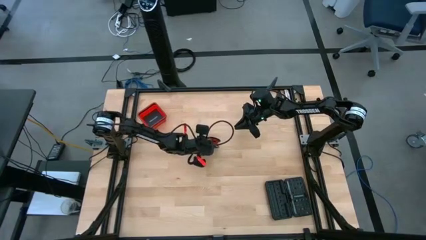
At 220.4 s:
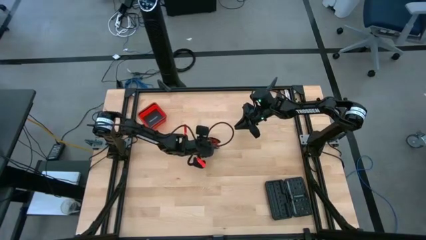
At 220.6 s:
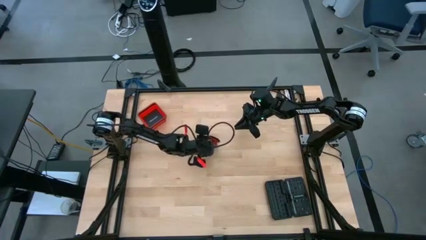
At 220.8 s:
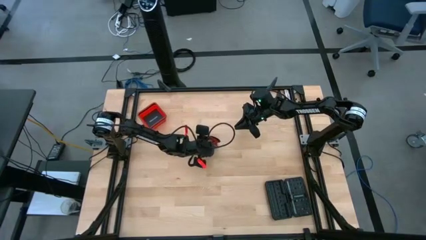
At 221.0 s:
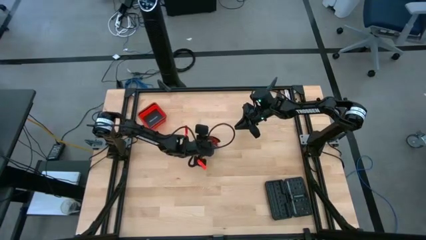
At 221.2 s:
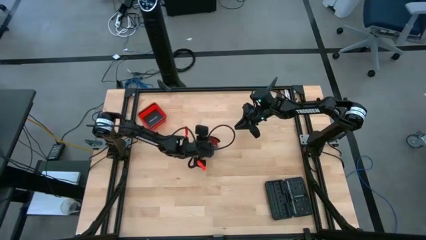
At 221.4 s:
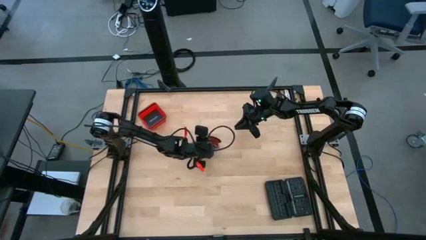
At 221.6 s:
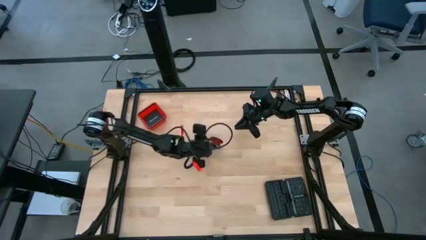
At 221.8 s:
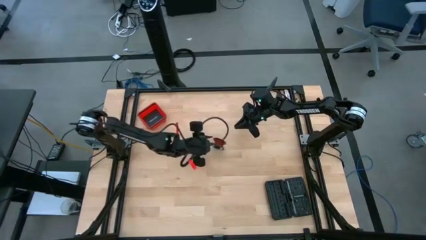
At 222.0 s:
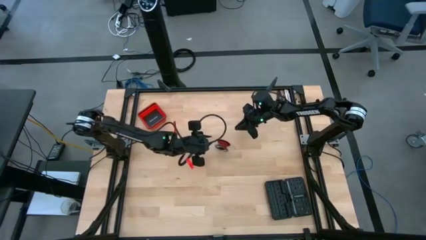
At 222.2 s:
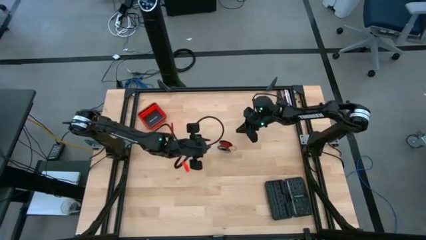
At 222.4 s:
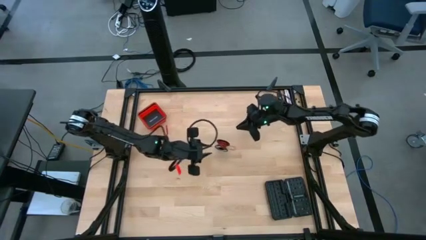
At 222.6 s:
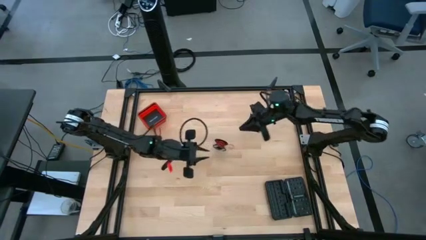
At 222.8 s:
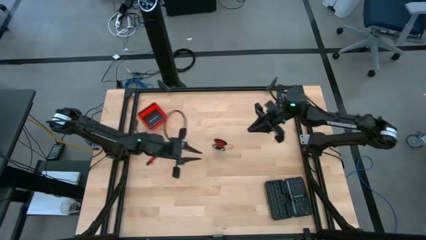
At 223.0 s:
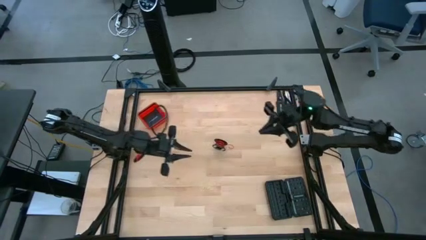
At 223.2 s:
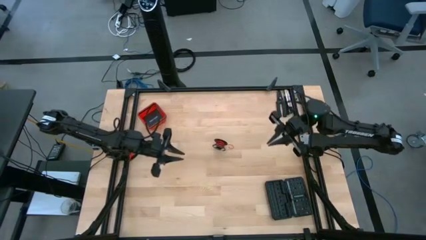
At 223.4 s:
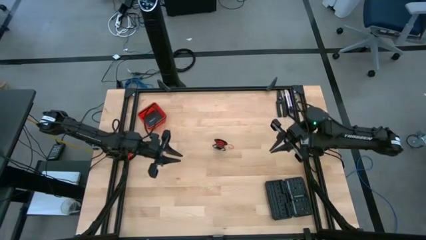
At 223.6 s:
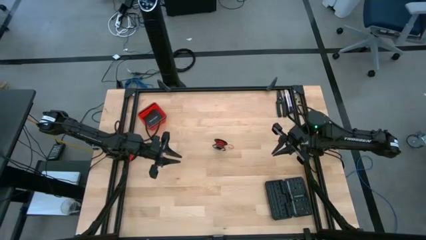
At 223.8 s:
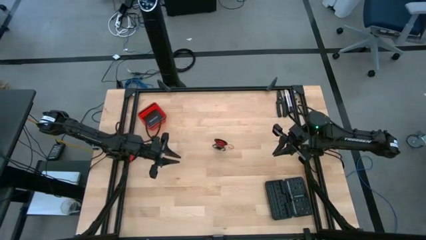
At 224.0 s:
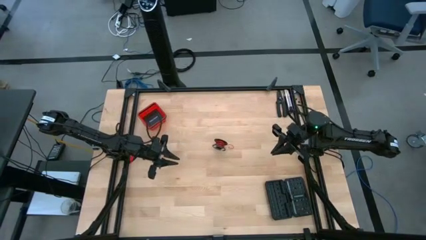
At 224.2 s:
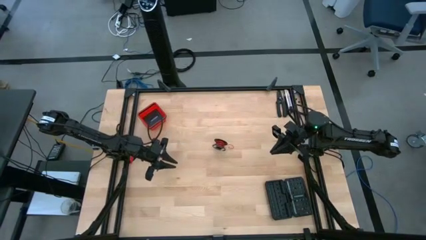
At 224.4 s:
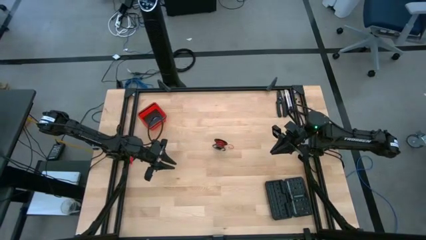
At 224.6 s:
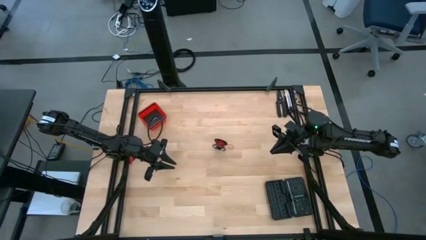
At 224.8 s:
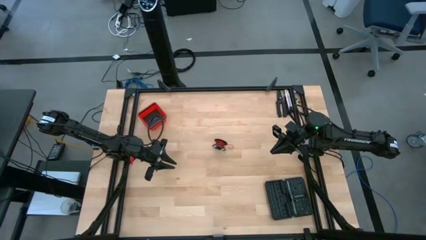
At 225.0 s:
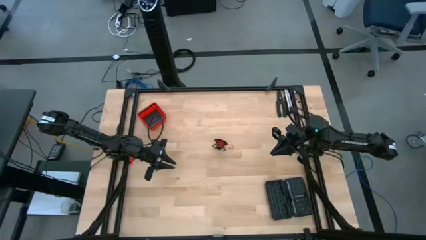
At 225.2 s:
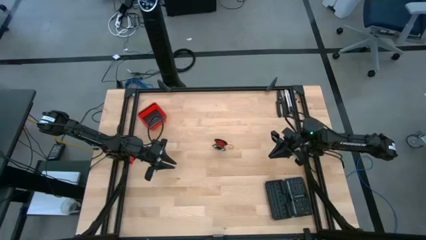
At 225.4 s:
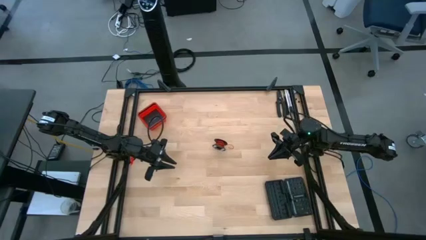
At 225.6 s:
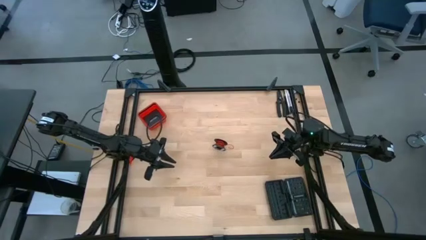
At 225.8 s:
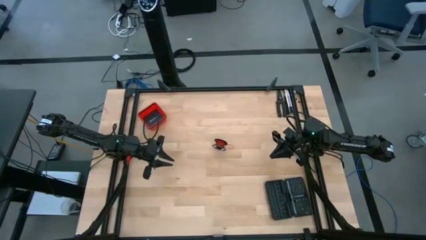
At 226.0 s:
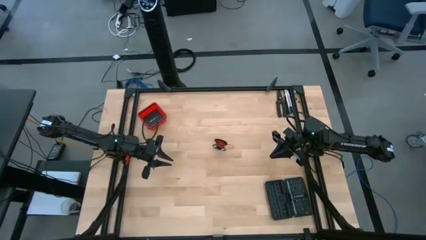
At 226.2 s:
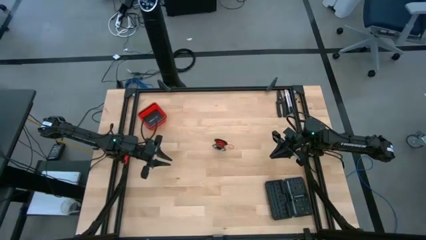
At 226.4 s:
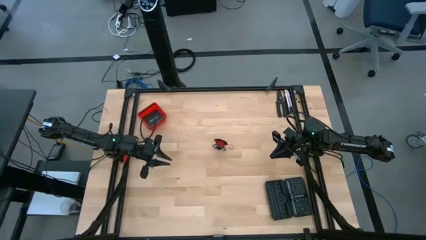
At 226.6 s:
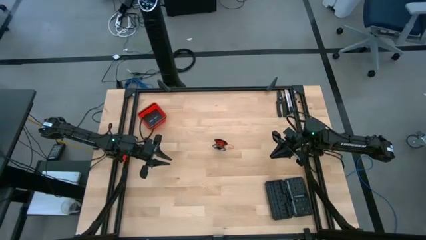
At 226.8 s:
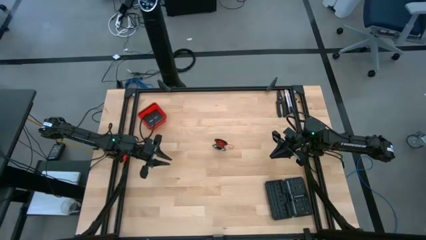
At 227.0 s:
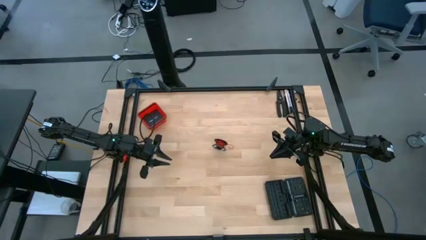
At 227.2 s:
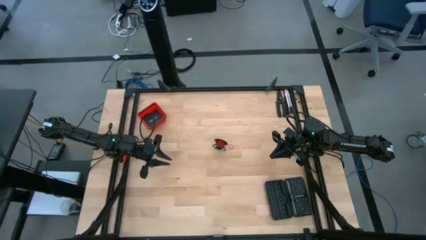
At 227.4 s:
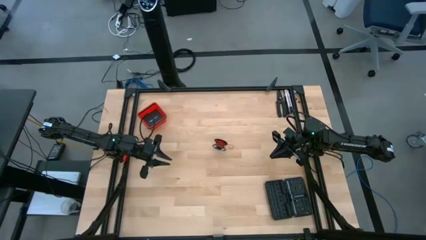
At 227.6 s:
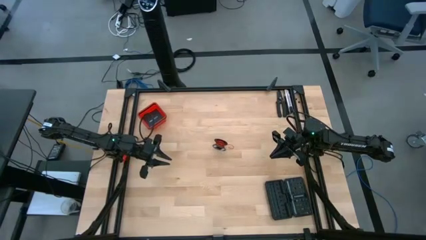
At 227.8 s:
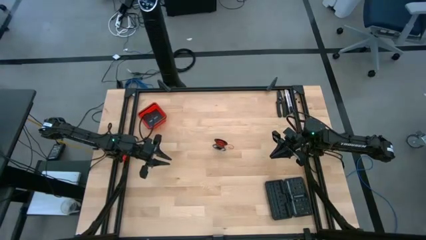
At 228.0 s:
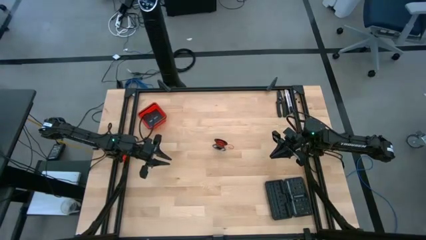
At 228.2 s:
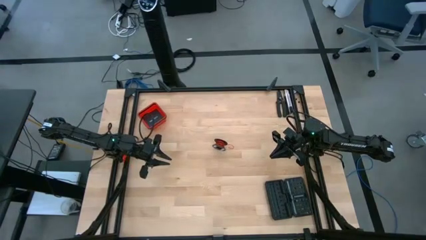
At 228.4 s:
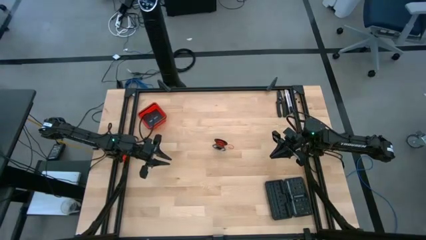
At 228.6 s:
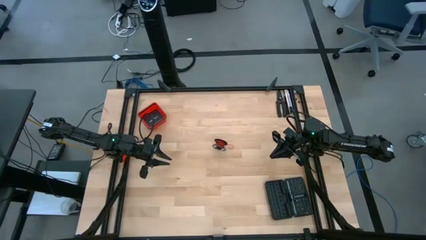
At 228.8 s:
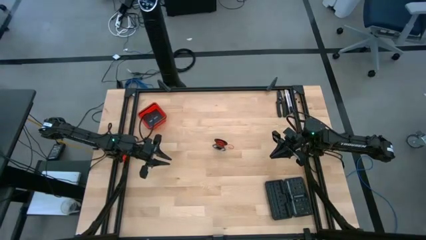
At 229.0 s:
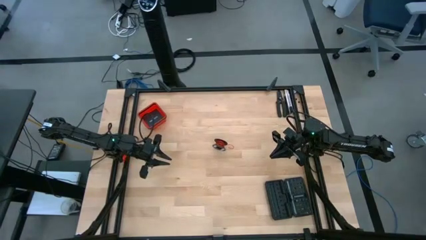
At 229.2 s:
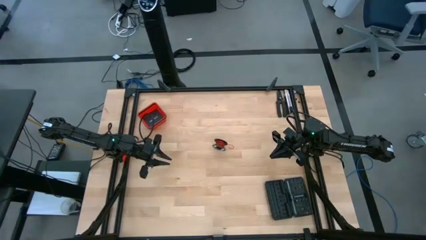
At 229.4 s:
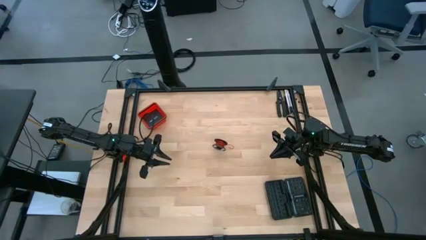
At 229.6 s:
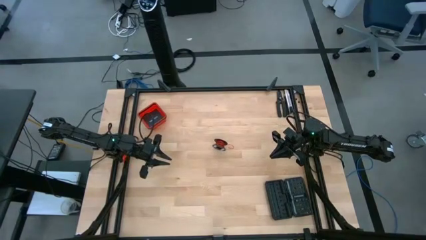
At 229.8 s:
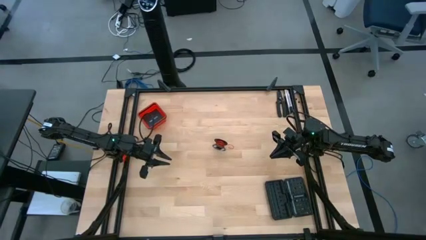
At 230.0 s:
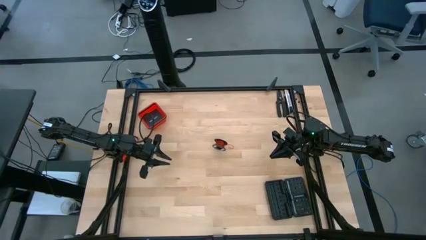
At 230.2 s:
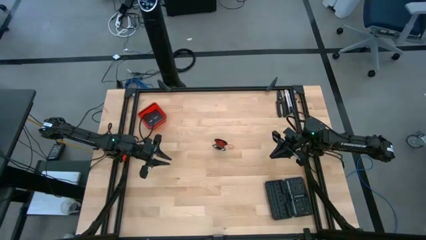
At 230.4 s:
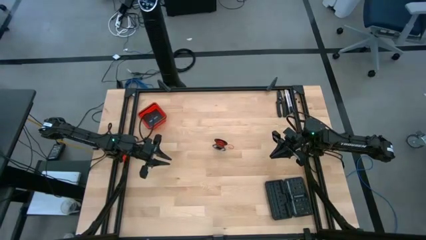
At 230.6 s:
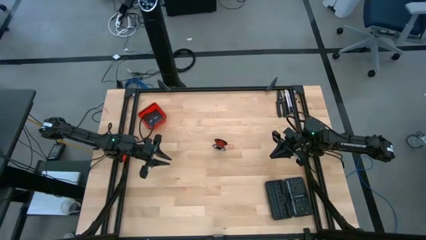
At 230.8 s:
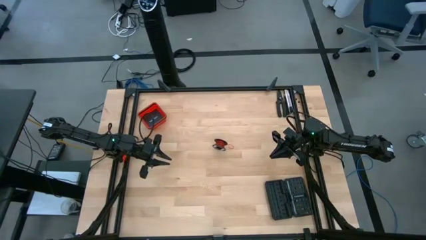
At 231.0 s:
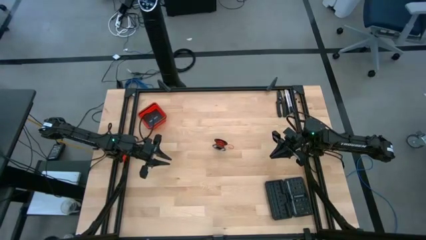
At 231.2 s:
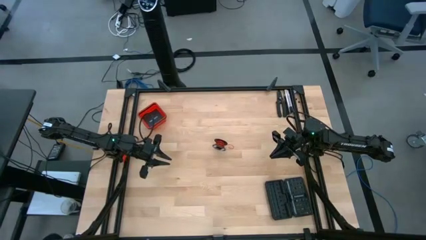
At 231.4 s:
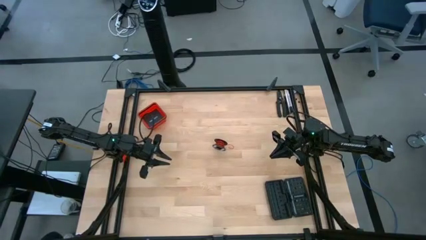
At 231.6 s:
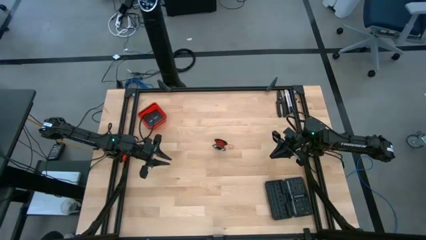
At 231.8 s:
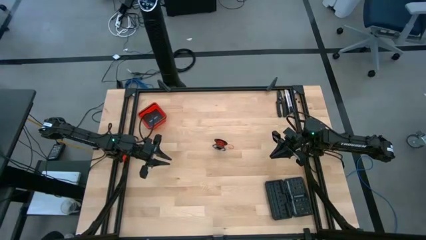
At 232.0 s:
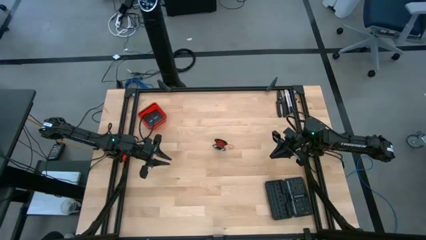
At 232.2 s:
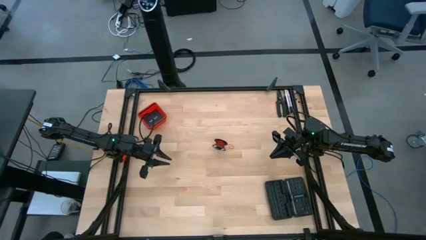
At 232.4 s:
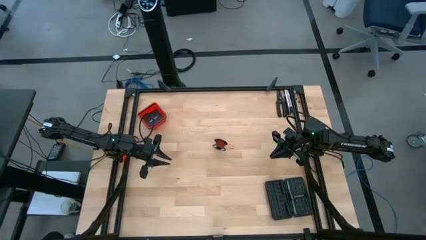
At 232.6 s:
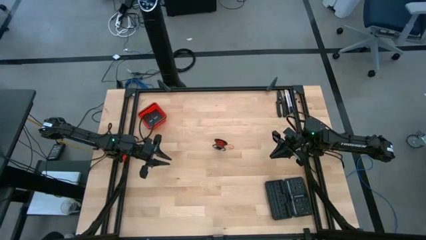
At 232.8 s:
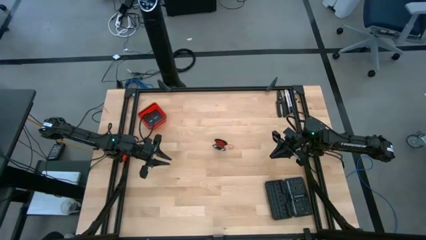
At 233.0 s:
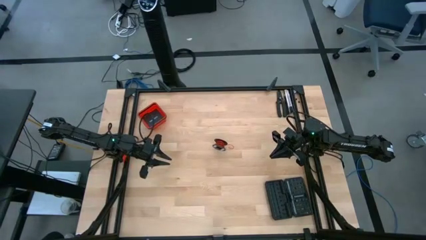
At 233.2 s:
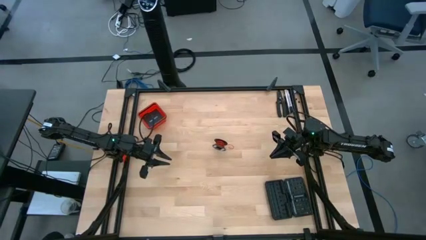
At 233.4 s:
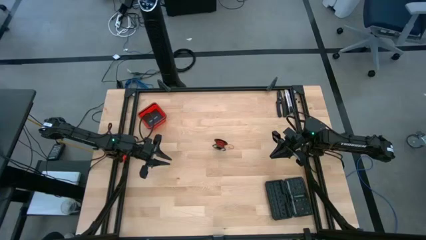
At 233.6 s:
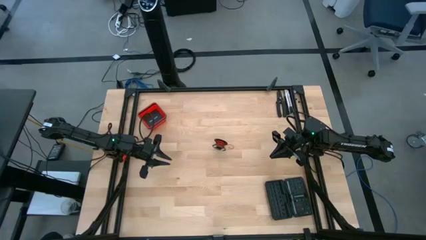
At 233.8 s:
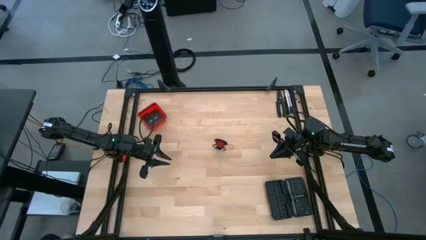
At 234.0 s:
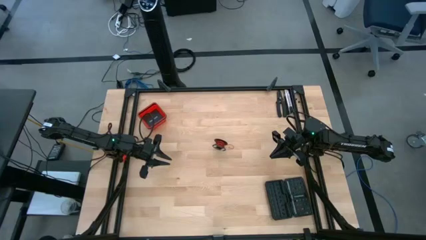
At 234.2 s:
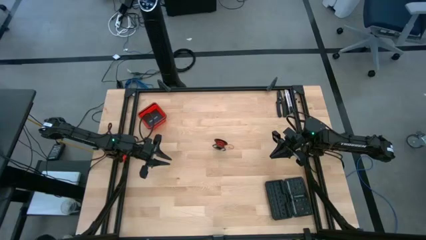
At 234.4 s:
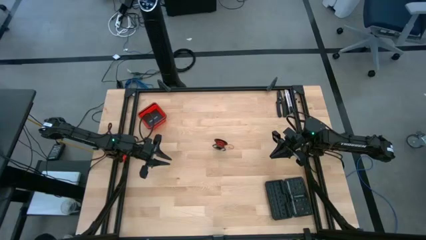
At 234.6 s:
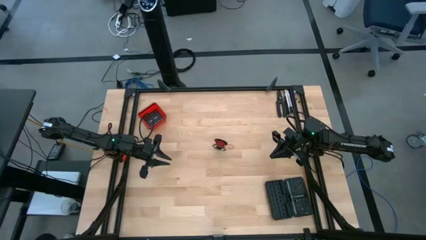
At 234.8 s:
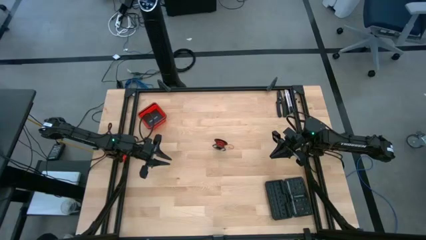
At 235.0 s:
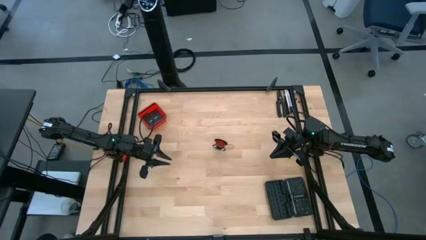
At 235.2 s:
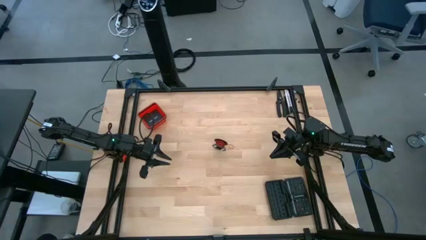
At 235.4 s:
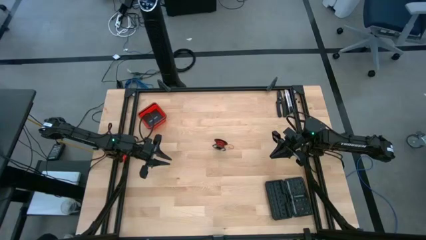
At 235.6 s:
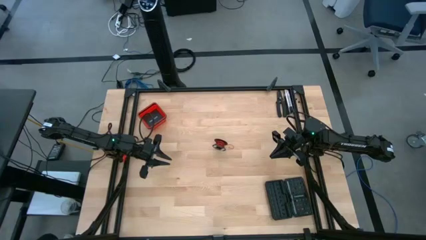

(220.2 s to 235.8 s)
Task: Coil cords
Return to Home Position
